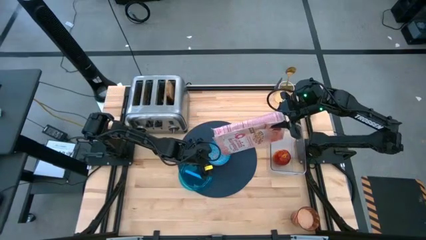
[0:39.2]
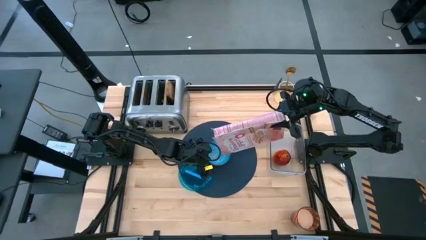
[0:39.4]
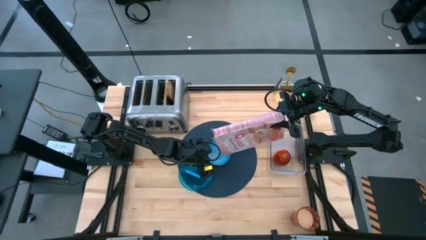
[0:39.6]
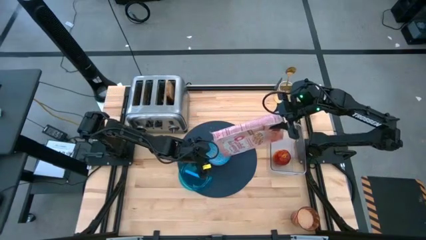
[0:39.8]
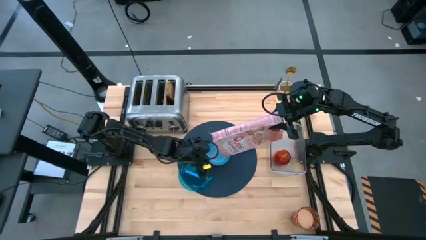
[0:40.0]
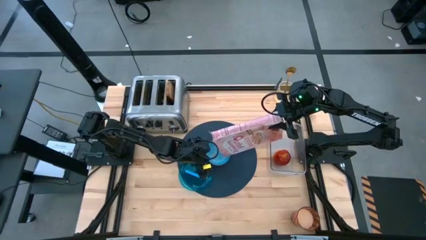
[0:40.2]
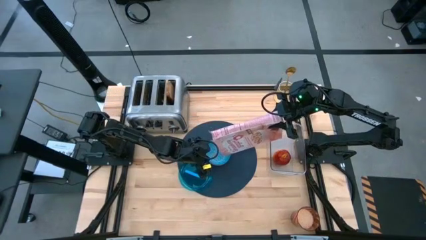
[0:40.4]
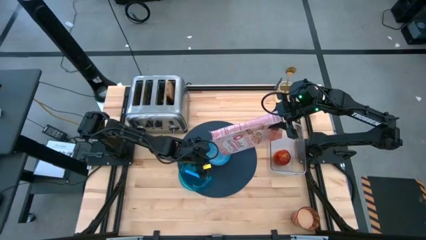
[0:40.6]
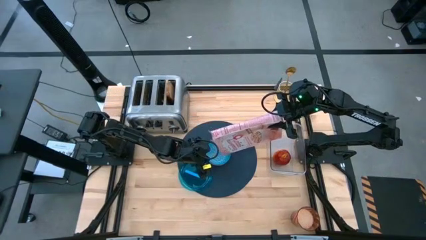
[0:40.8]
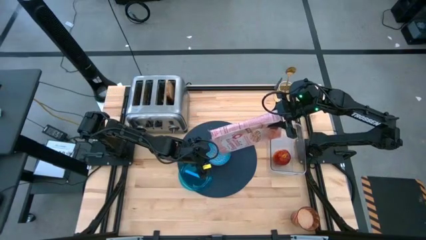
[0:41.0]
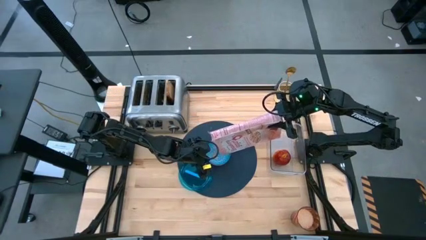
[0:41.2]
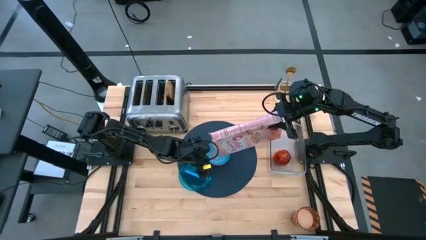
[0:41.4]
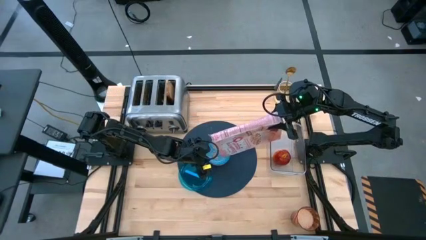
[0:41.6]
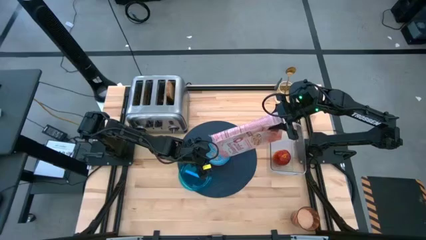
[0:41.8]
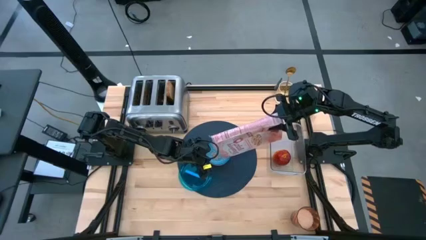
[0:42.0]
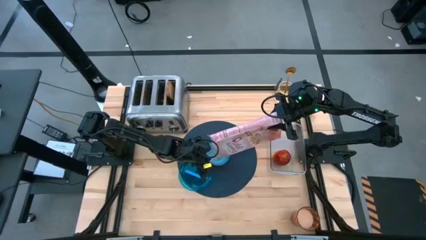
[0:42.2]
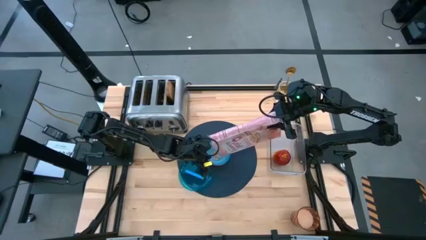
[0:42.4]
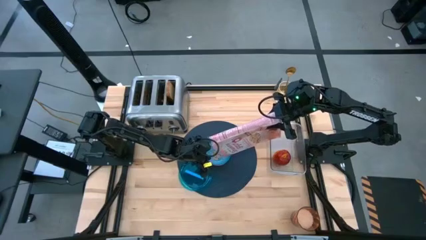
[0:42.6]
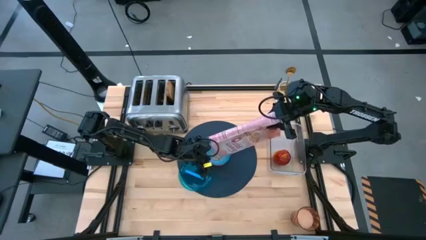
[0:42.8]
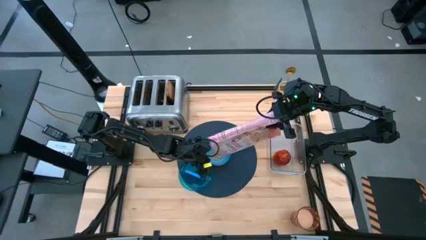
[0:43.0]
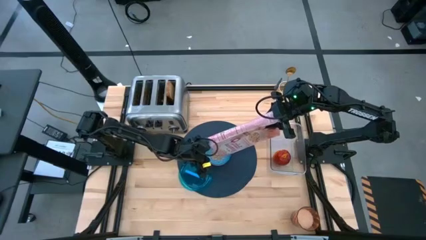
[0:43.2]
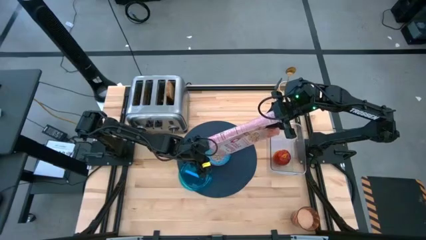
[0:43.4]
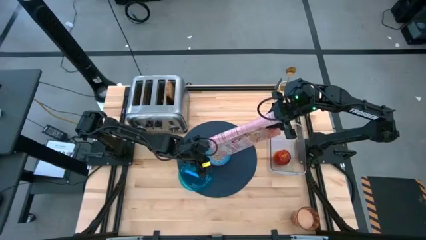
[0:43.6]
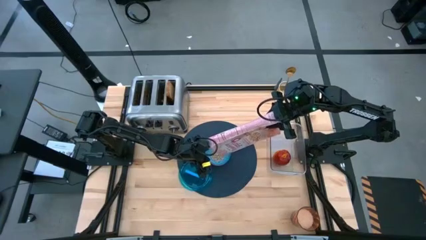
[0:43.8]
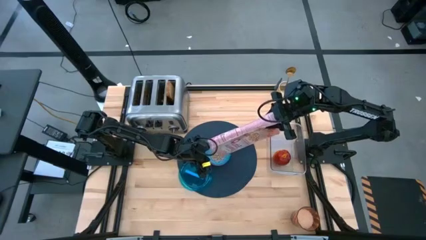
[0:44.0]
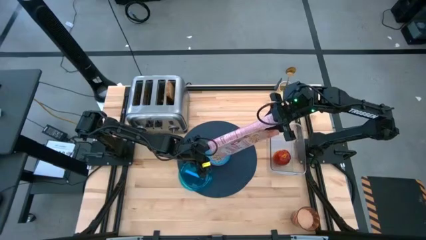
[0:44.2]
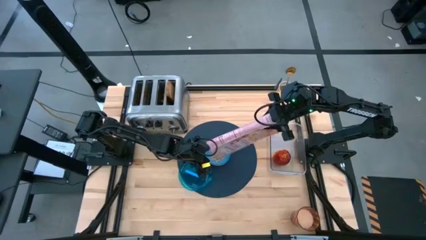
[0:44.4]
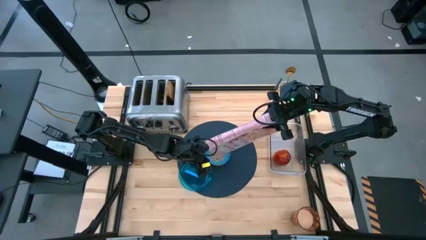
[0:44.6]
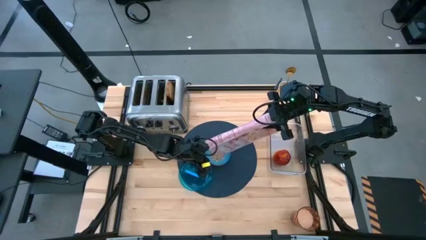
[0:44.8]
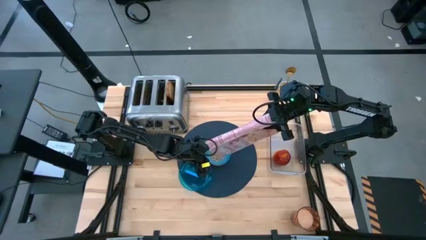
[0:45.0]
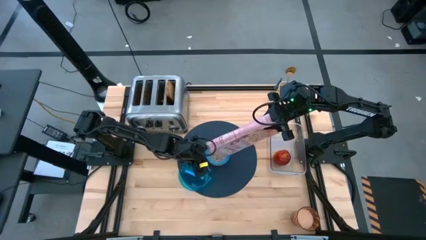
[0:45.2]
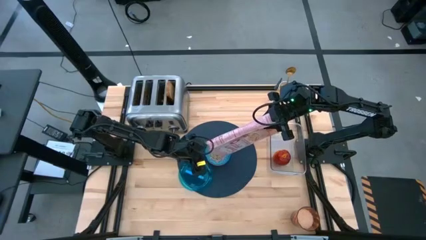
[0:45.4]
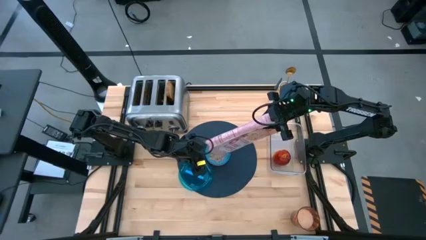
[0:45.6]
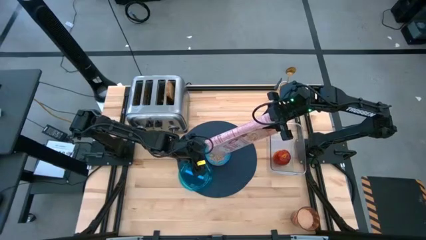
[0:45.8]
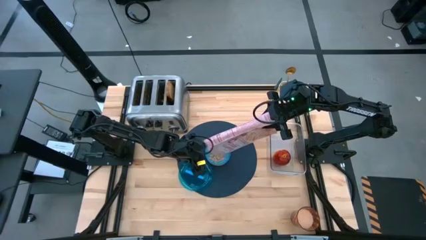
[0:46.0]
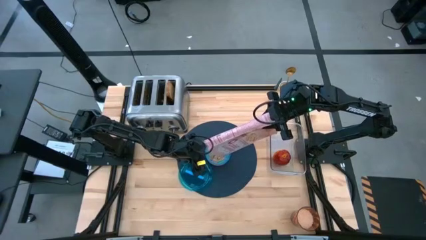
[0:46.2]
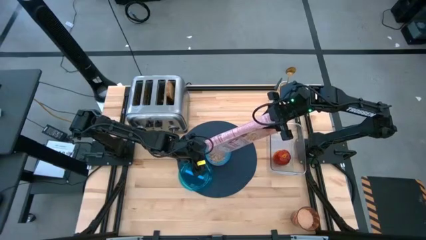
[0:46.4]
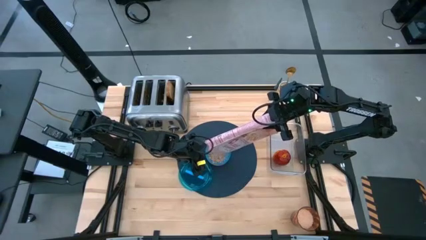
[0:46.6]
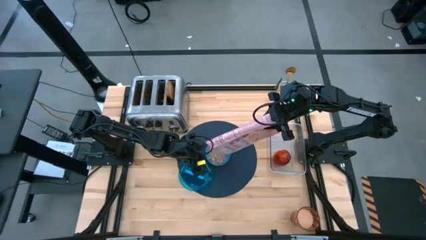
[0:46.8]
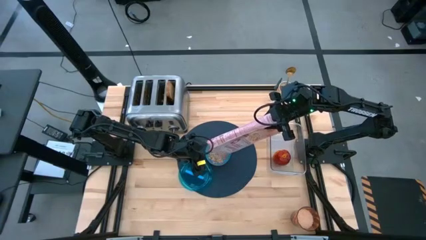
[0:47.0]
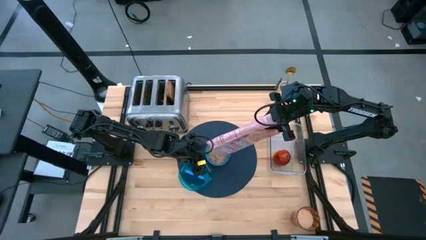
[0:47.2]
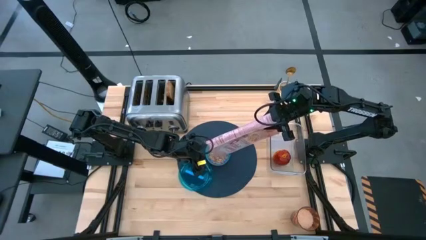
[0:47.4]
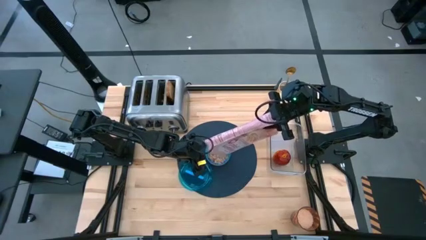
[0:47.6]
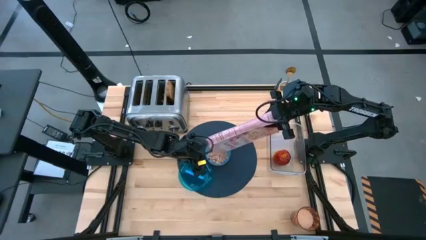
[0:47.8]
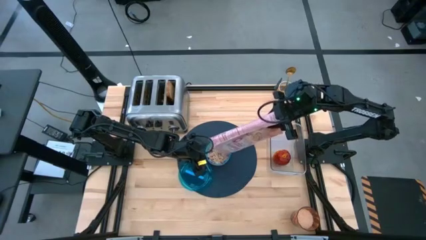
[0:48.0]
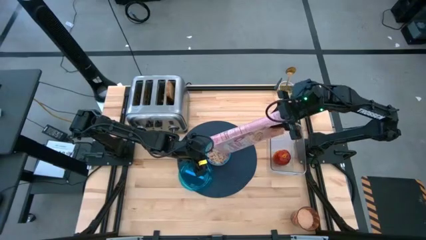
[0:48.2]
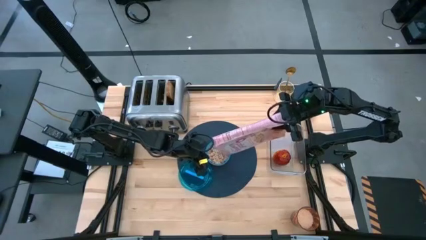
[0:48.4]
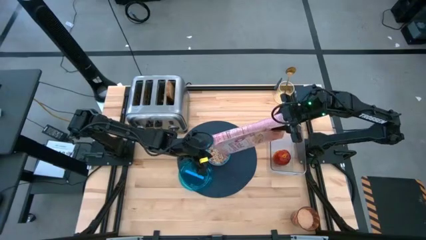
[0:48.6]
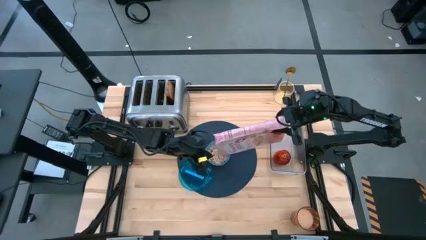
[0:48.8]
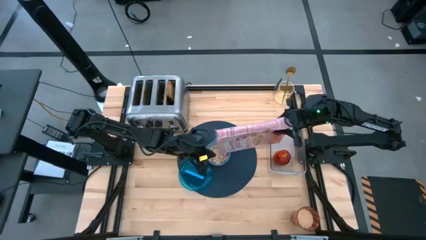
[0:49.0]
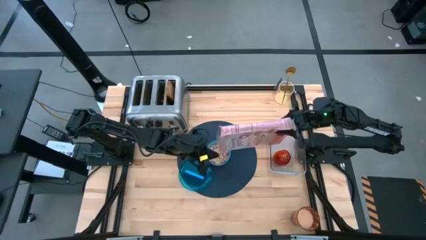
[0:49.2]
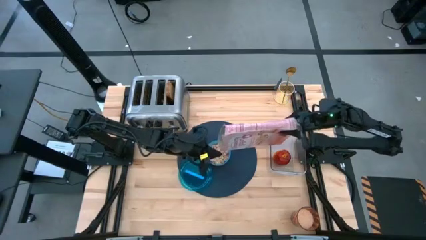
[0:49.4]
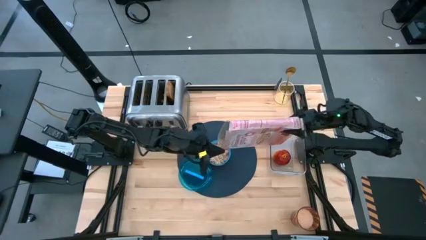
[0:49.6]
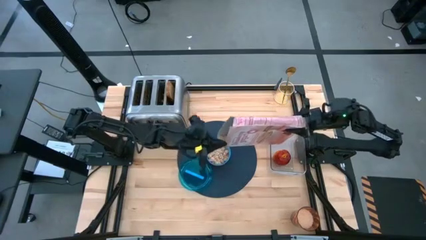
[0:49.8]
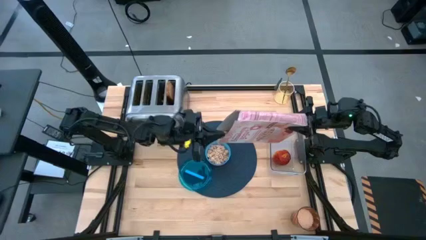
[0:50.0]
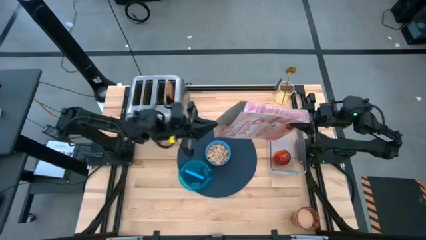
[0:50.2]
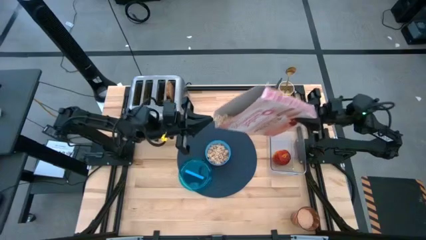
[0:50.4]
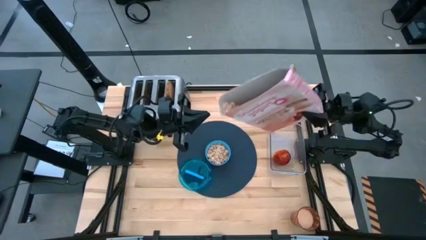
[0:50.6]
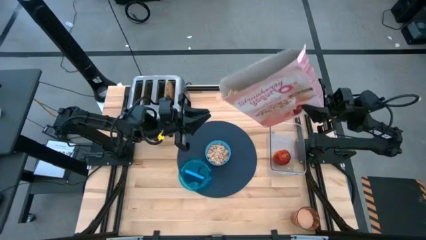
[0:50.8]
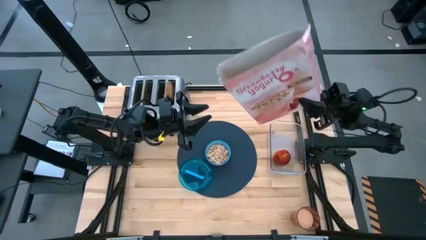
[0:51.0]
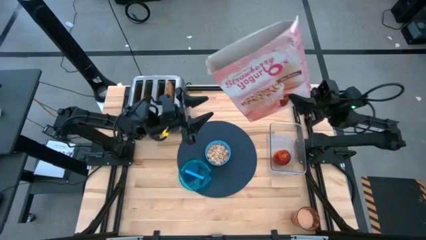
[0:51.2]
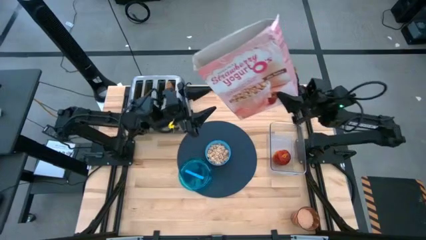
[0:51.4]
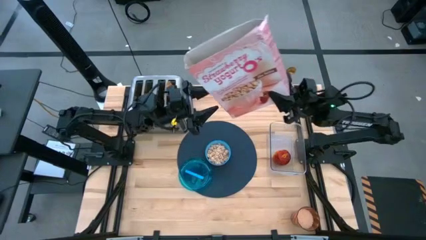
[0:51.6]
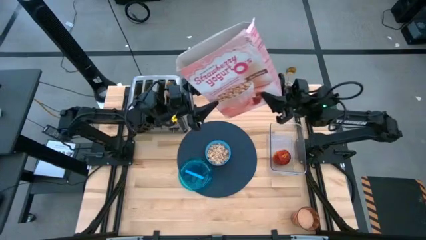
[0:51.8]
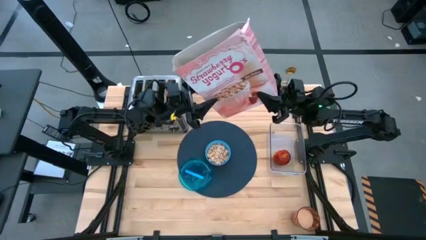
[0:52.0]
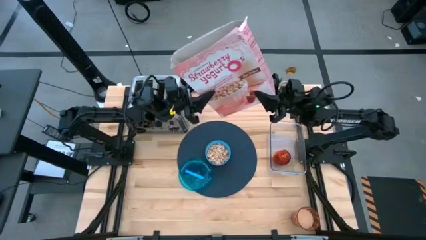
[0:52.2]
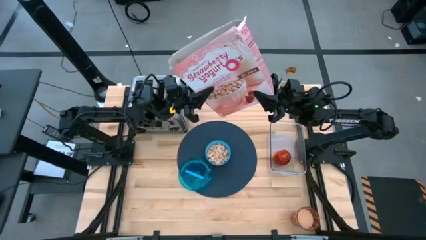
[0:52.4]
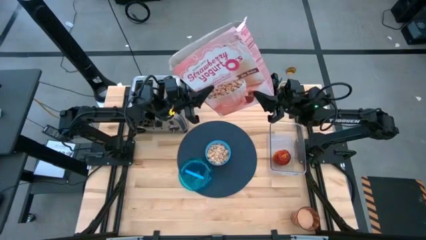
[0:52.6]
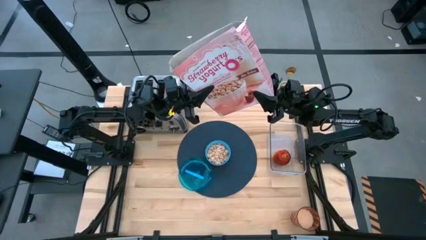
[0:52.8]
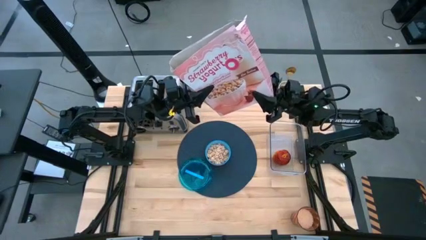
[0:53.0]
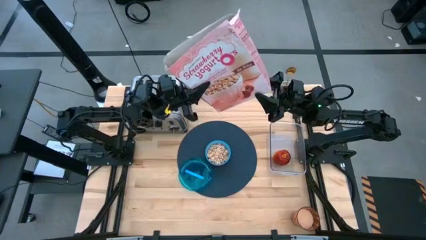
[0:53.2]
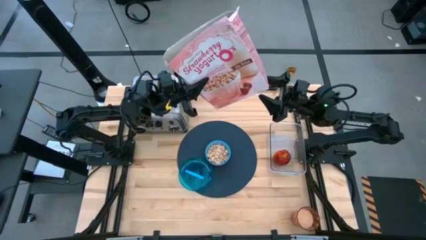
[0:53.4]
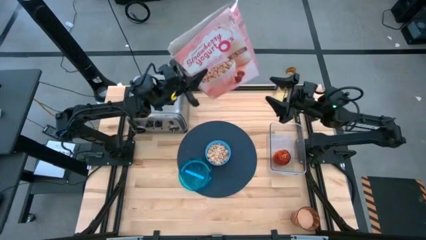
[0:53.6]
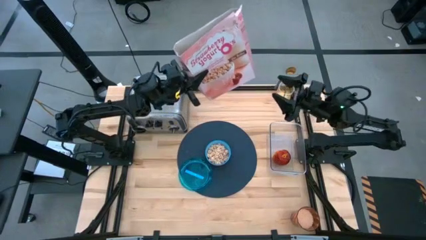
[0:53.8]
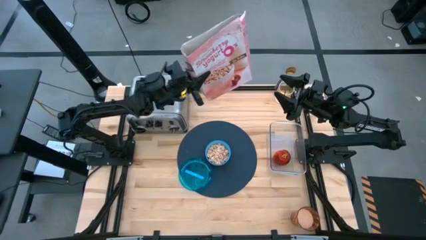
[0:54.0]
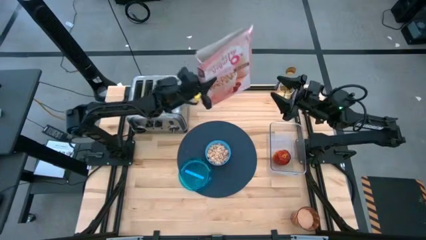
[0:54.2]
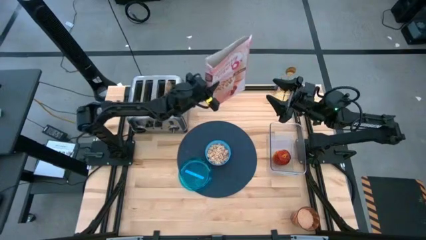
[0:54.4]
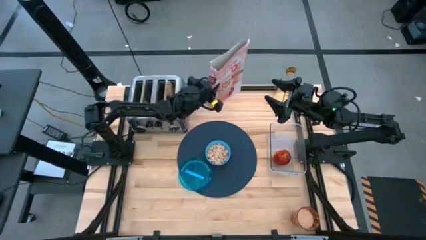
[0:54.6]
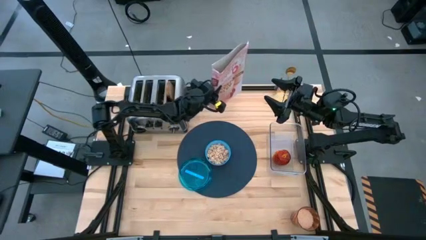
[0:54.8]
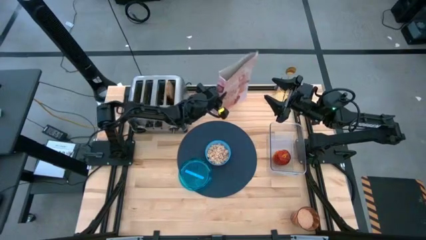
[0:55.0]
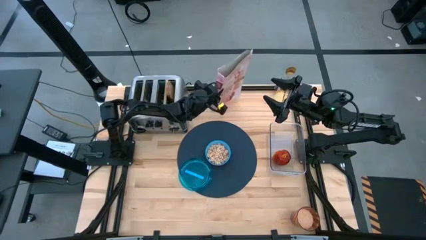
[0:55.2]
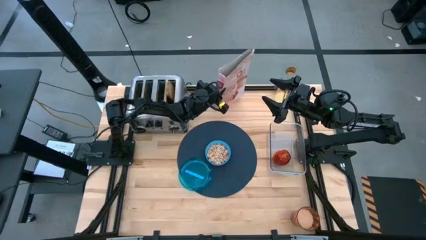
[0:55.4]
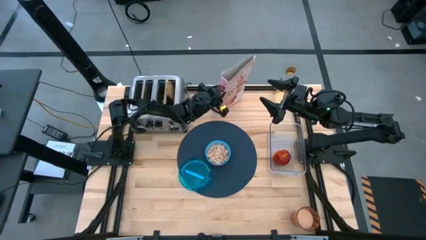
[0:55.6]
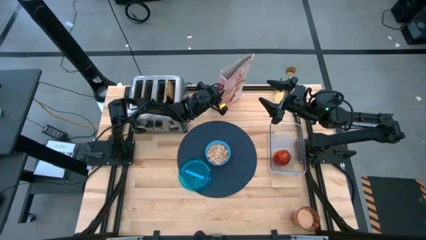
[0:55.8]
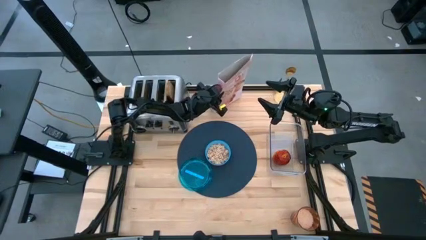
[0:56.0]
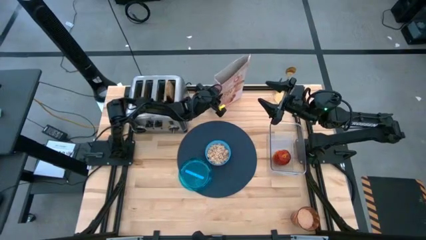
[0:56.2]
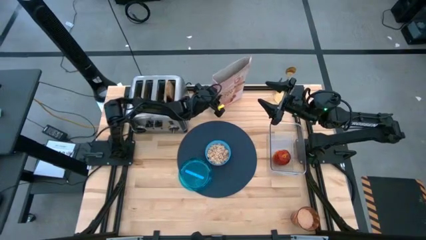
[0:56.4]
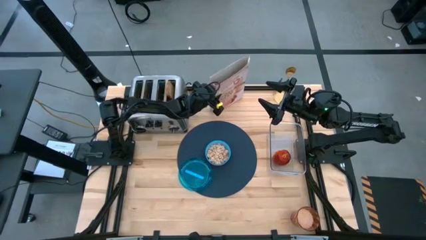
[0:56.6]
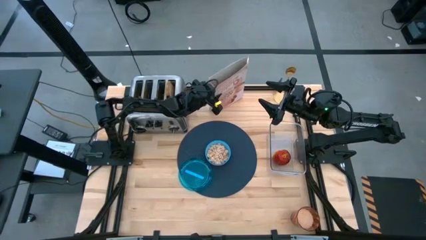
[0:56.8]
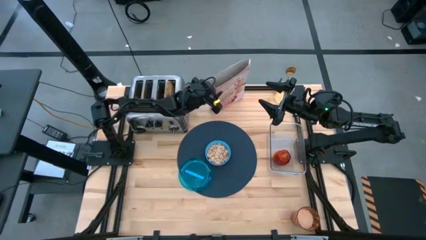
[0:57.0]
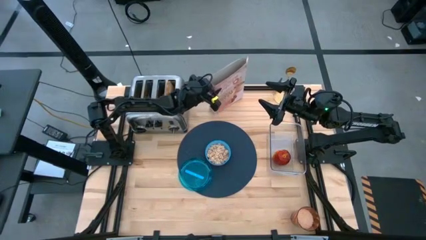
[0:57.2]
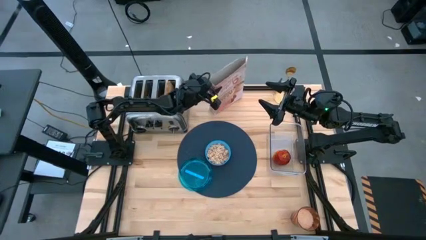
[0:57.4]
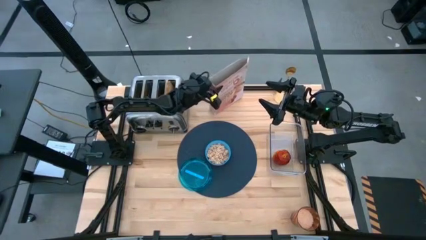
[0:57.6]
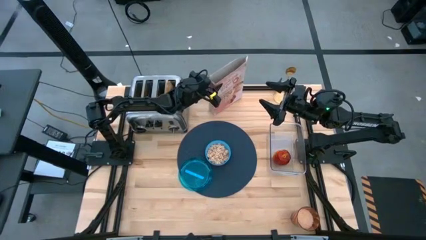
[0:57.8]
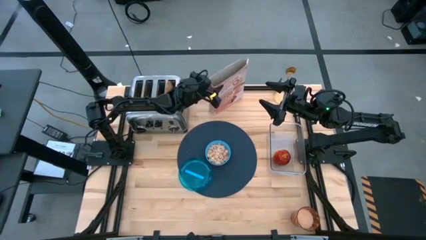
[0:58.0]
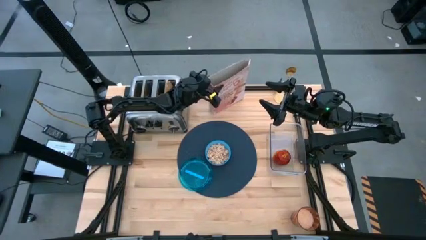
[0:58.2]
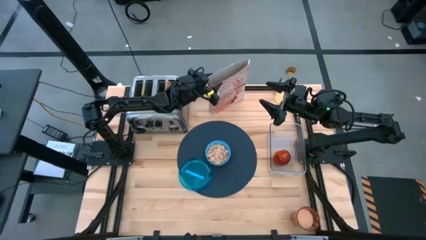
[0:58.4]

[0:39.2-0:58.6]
Task: Arrange a breakfast setting
Pour the cereals from the pink cereal box into the blue bowl
